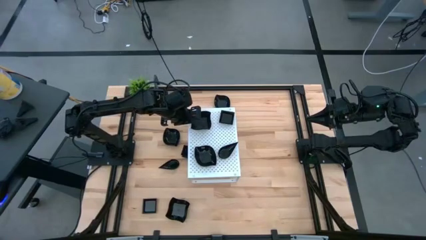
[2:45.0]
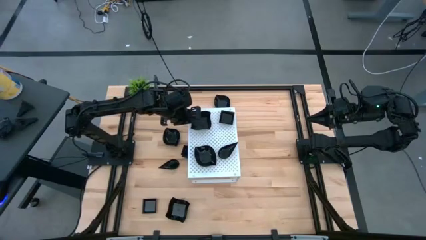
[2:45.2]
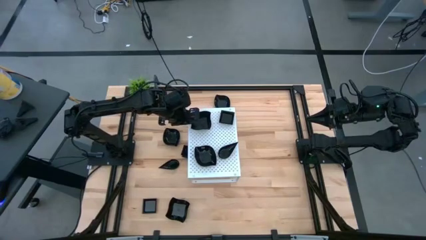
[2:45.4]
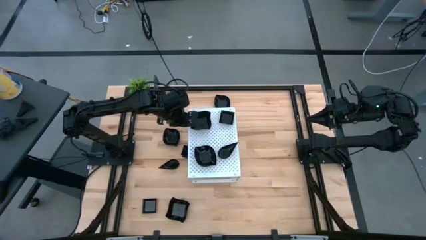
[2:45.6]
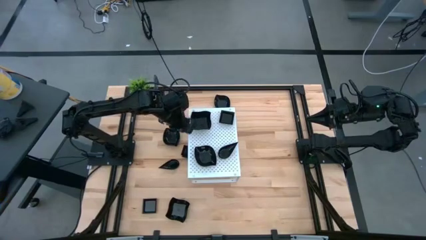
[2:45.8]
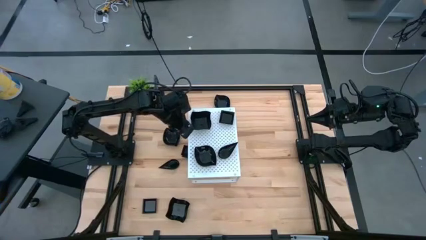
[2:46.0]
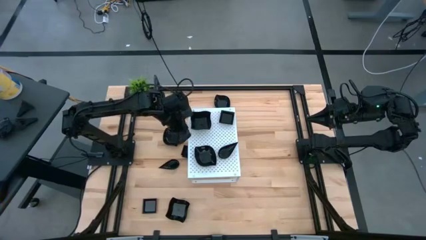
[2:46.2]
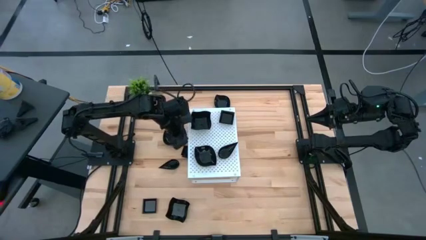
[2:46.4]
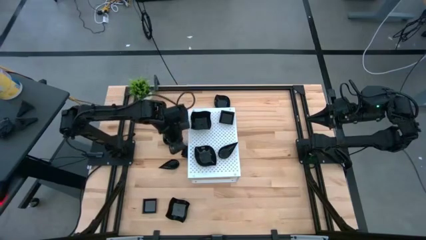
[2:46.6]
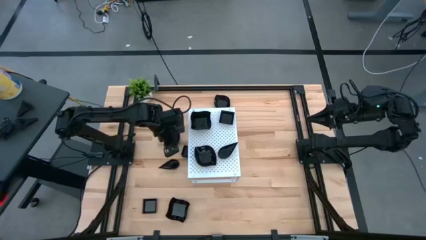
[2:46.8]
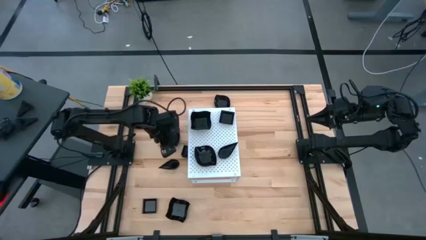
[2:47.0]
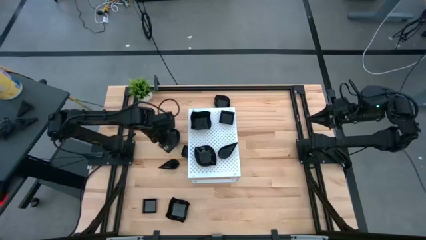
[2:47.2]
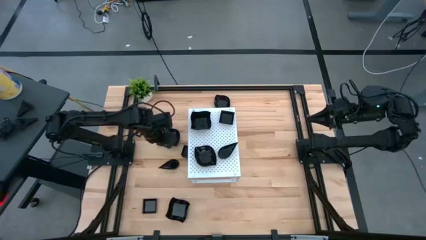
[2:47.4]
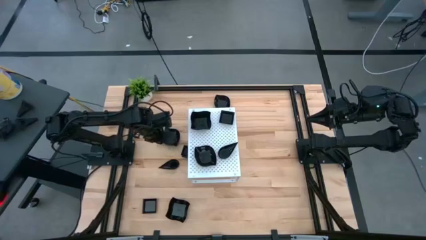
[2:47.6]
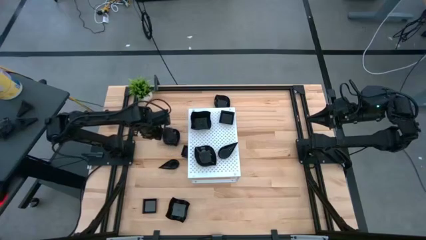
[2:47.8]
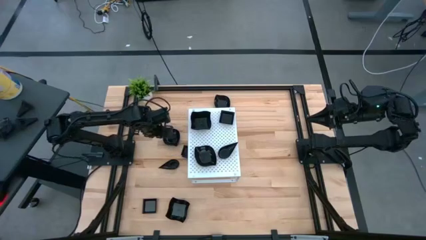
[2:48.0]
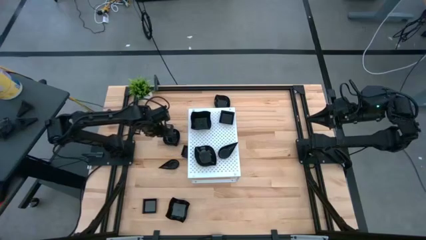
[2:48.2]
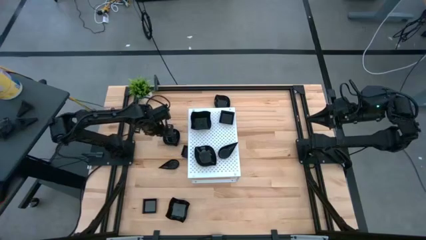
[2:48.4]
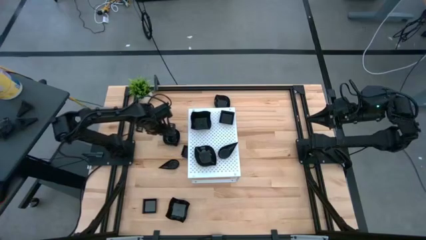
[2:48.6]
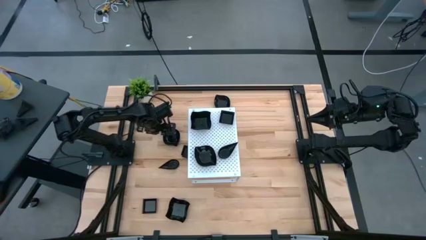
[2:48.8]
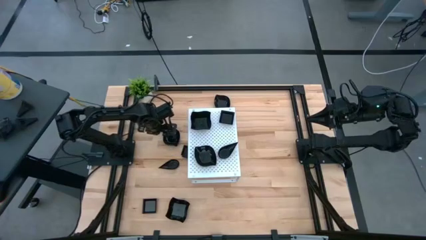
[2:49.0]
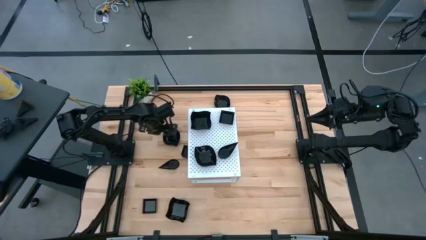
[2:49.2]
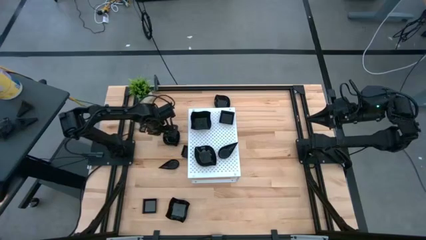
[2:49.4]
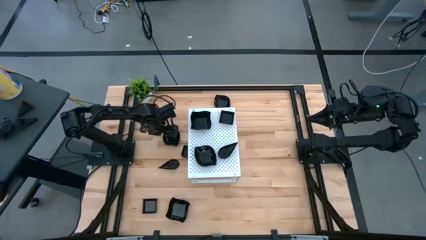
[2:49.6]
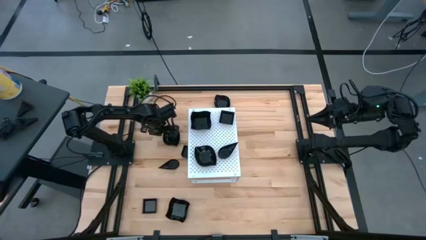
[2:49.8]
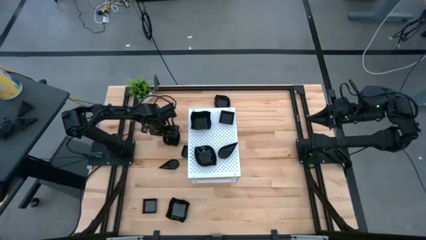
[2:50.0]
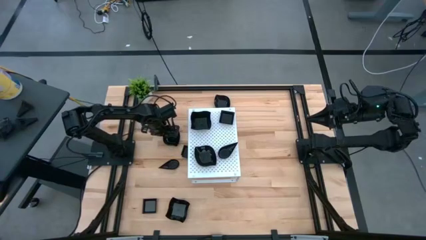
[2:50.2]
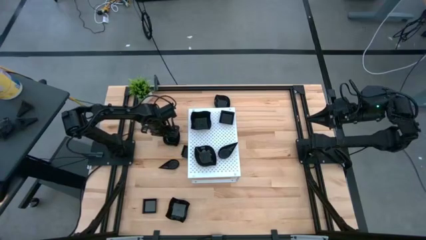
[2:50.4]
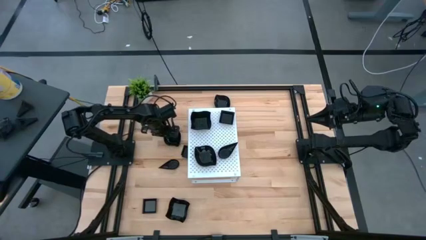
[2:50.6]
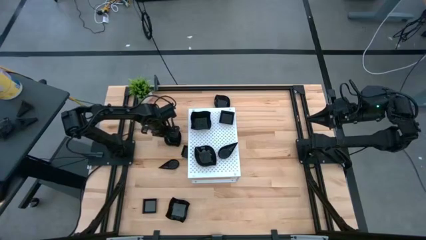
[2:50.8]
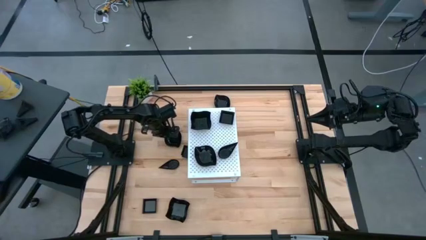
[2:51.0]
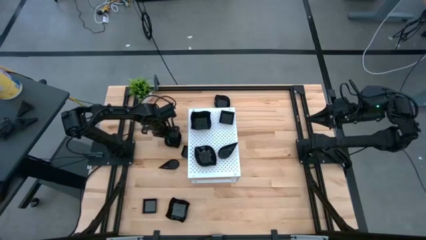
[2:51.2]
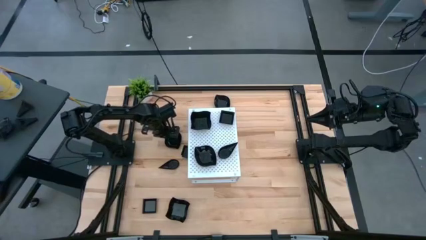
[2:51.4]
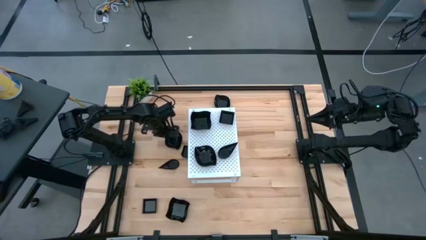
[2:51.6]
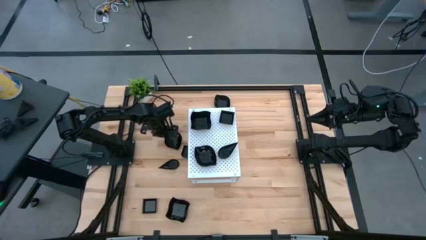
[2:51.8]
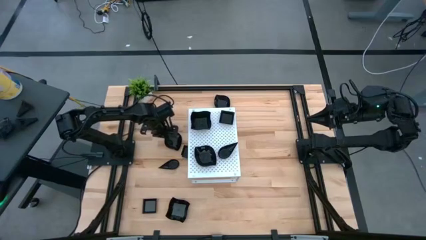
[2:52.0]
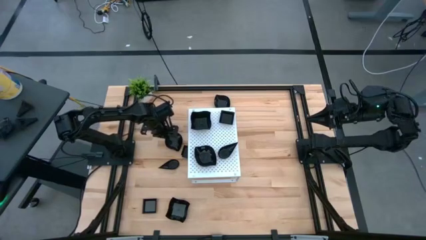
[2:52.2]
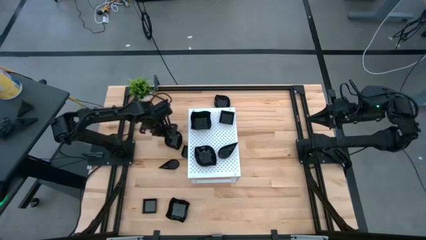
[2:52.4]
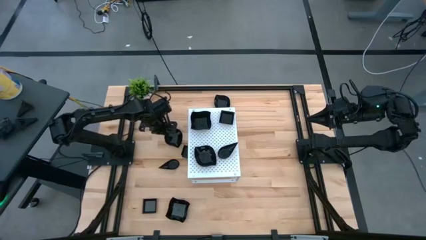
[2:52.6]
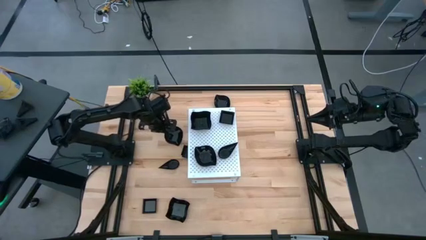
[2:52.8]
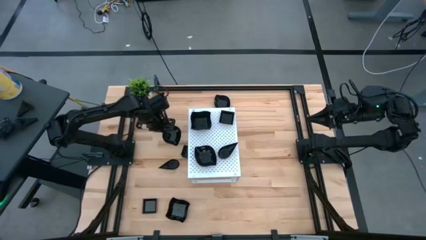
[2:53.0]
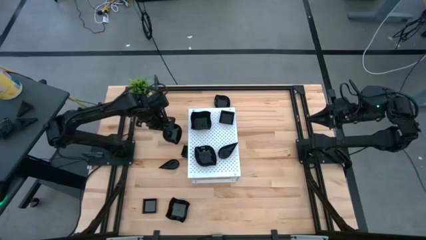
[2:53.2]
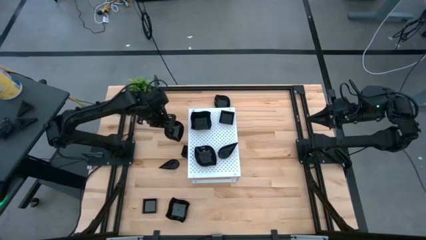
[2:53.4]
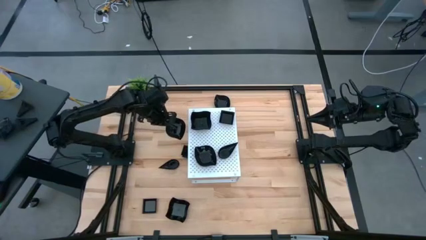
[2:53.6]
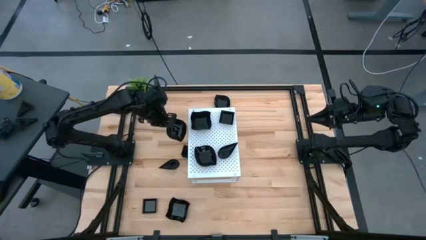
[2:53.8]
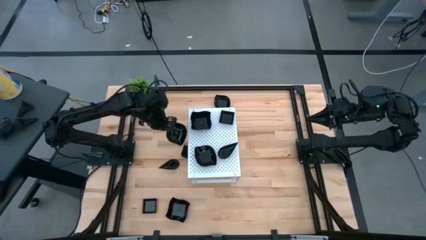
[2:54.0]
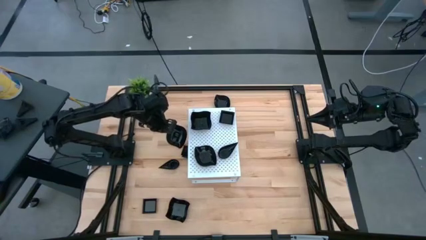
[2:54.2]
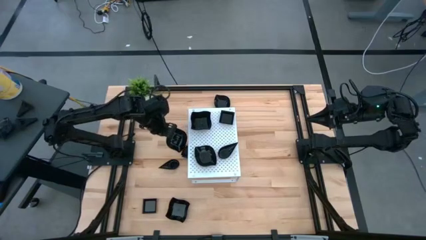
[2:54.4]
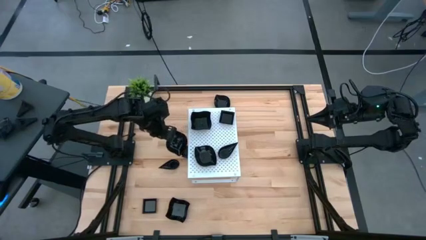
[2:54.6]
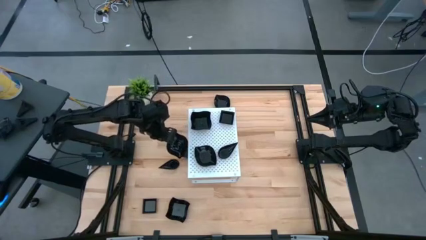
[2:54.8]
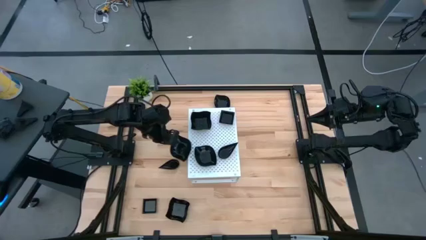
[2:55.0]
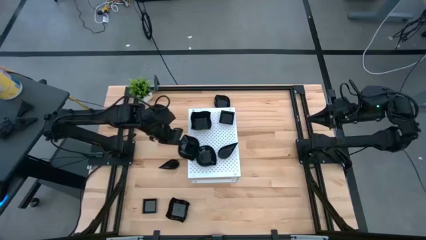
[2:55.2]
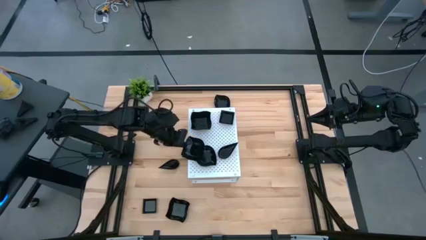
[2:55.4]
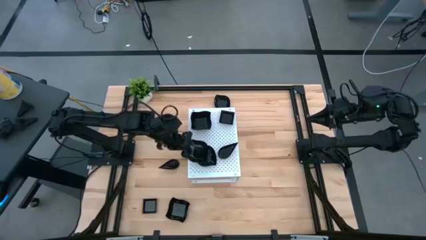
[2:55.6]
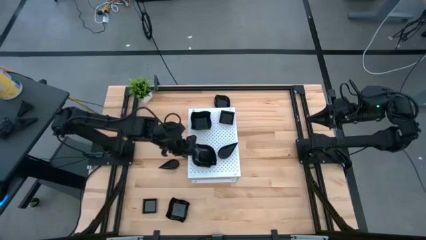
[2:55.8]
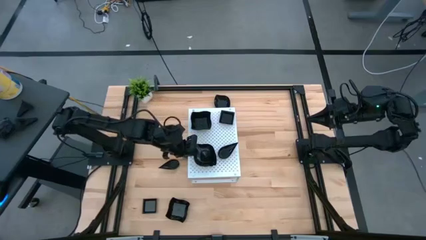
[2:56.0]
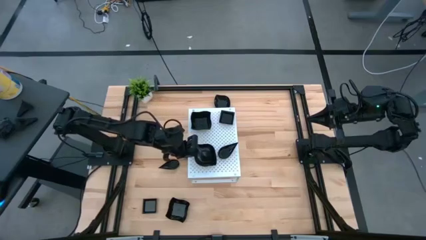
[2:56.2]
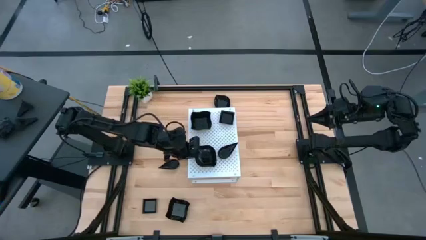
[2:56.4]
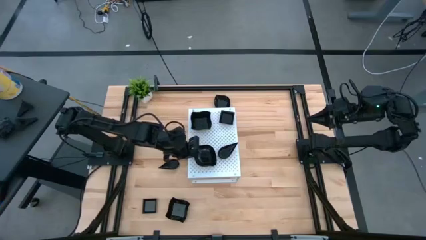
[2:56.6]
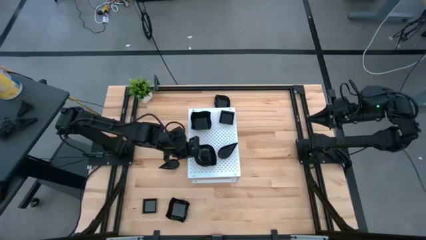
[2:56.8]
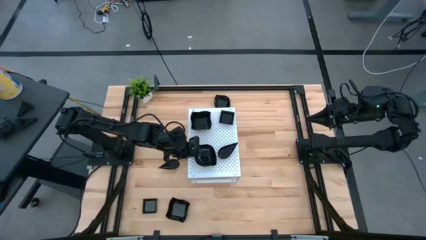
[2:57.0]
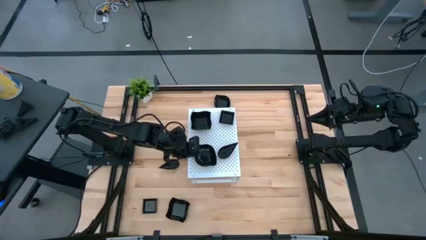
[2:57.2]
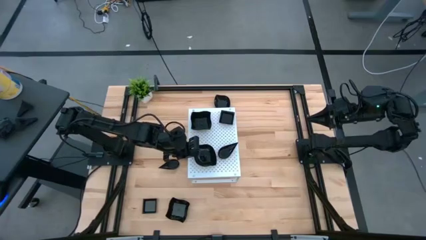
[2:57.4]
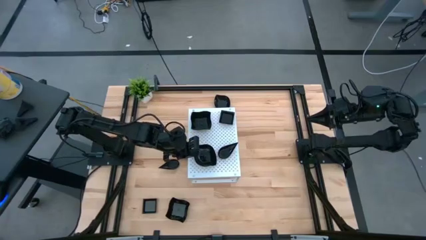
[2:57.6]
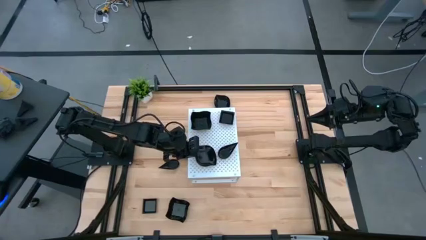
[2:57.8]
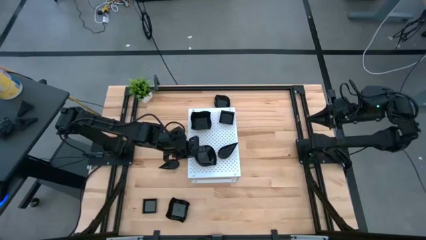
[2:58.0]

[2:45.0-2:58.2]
Task: Pick & Place Mini shaped plates
Stack the black leaf shaped plate on top of the other black leaf shaped plate on the shelf
